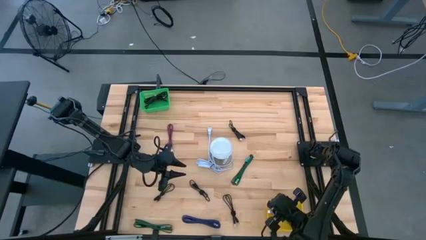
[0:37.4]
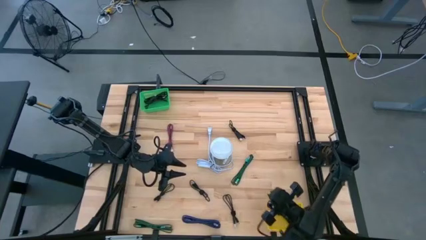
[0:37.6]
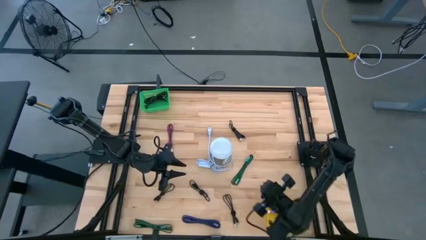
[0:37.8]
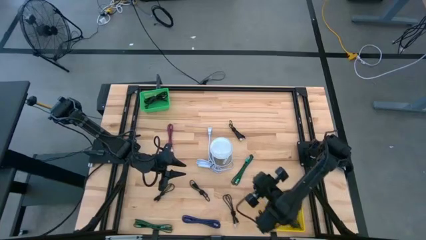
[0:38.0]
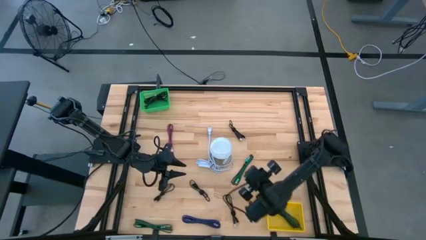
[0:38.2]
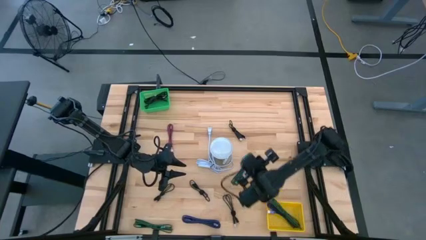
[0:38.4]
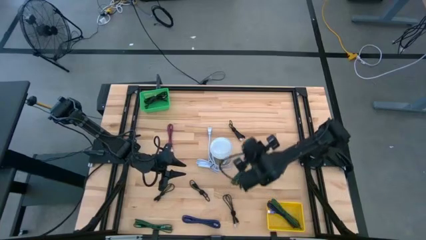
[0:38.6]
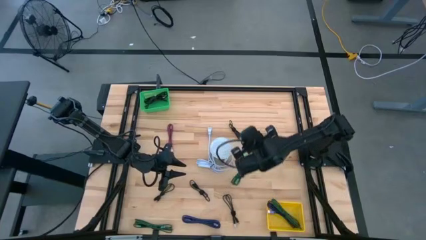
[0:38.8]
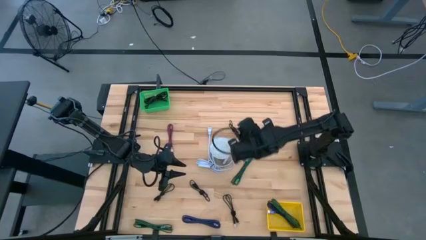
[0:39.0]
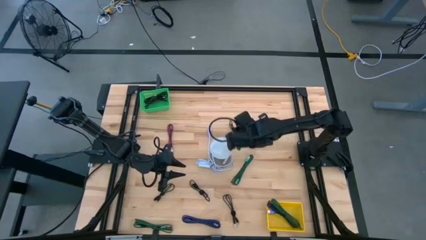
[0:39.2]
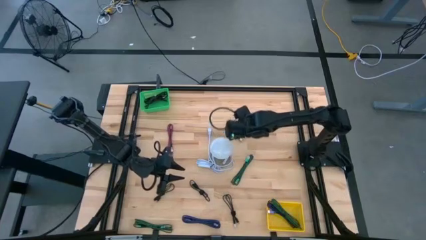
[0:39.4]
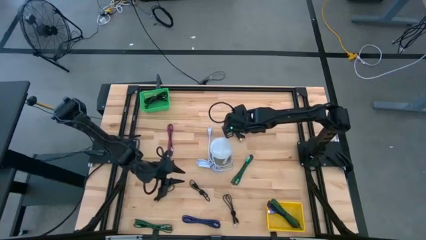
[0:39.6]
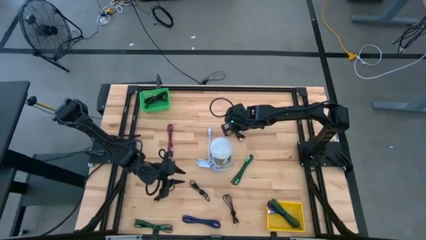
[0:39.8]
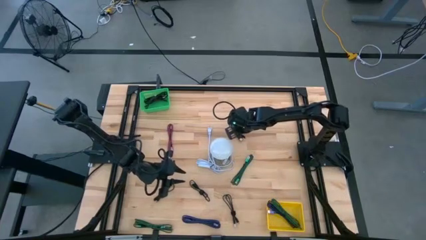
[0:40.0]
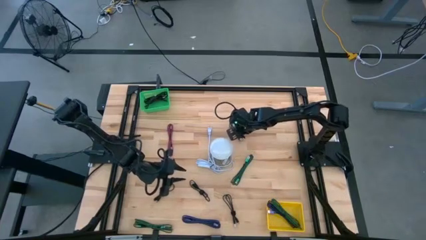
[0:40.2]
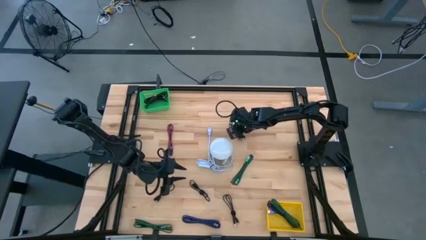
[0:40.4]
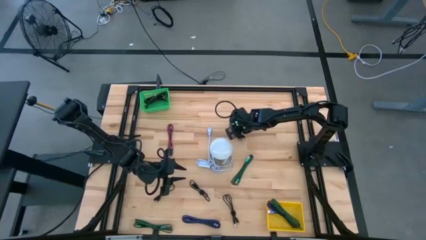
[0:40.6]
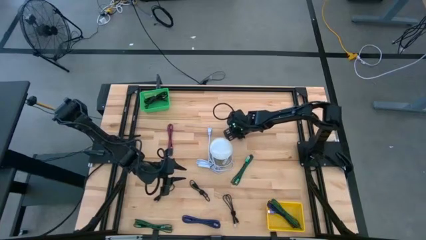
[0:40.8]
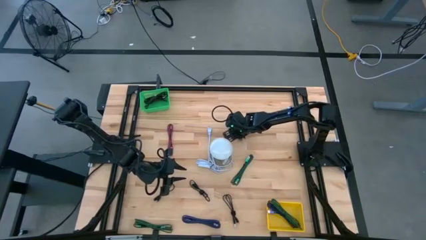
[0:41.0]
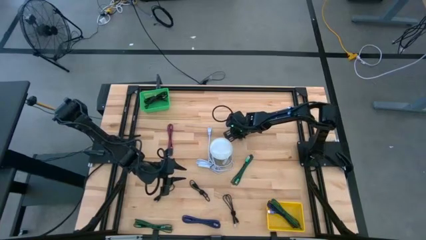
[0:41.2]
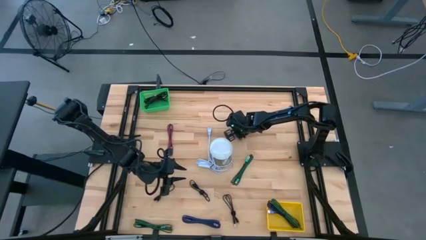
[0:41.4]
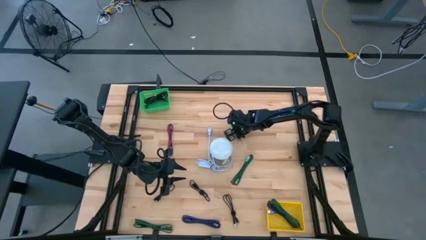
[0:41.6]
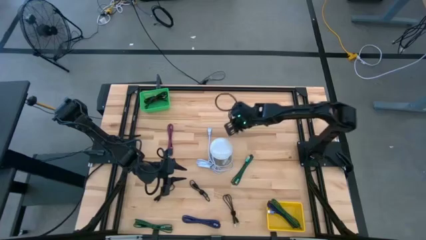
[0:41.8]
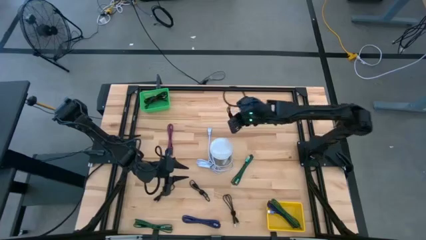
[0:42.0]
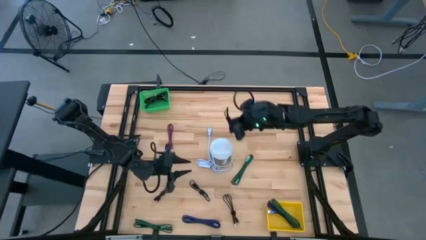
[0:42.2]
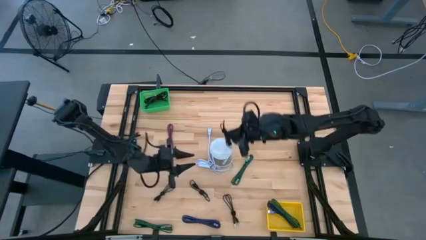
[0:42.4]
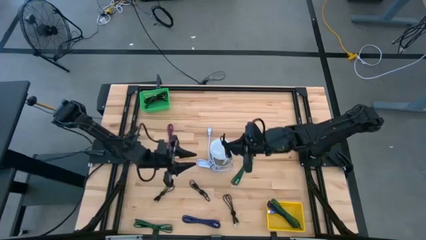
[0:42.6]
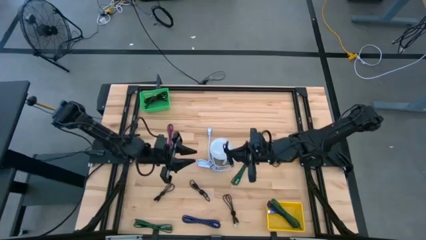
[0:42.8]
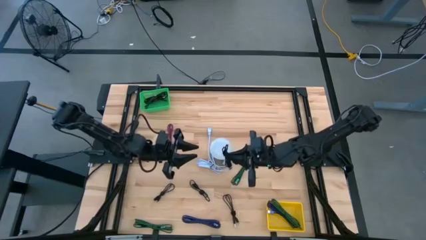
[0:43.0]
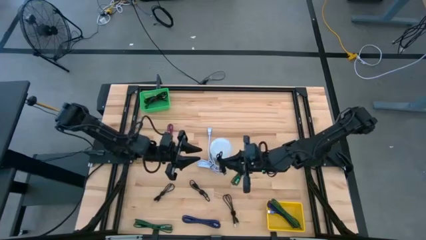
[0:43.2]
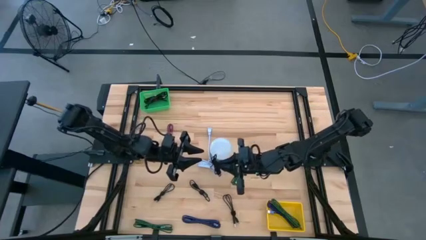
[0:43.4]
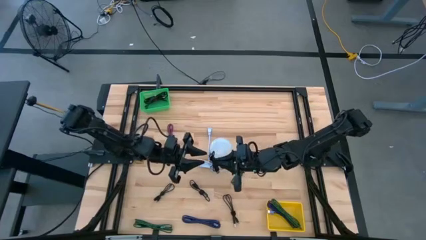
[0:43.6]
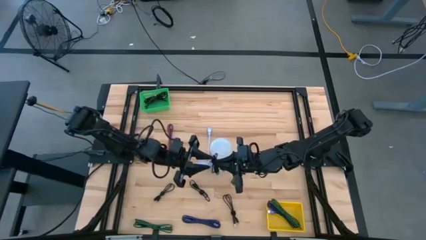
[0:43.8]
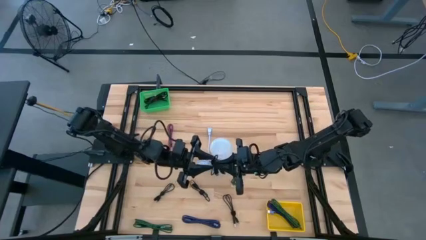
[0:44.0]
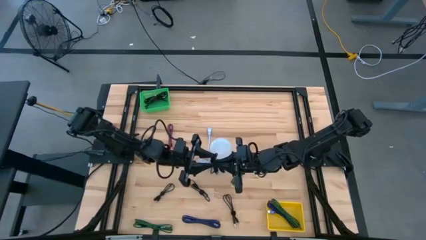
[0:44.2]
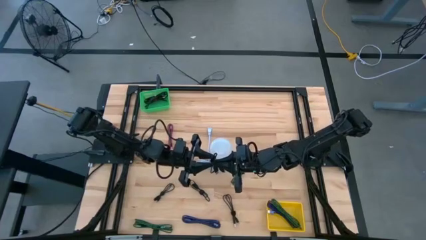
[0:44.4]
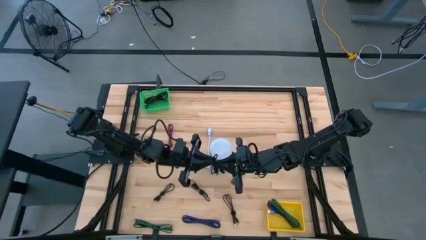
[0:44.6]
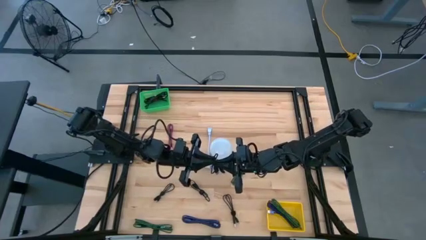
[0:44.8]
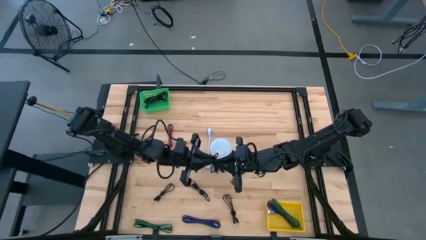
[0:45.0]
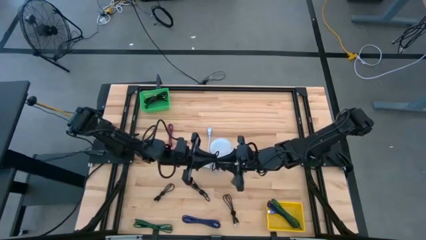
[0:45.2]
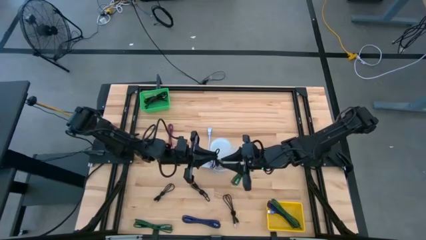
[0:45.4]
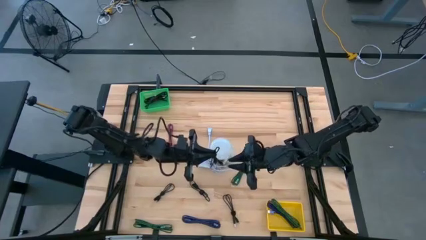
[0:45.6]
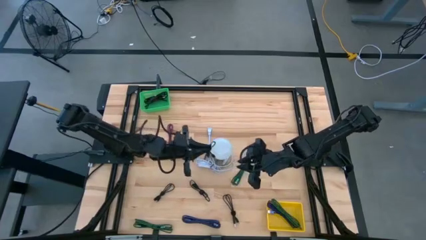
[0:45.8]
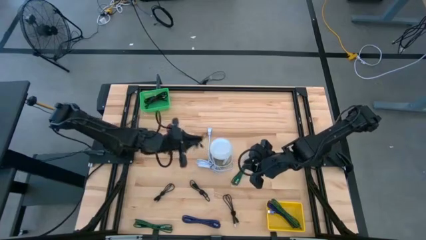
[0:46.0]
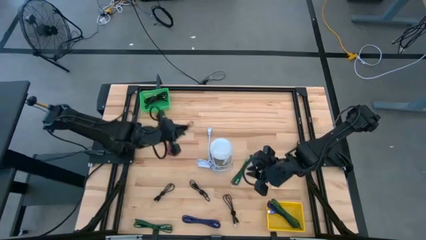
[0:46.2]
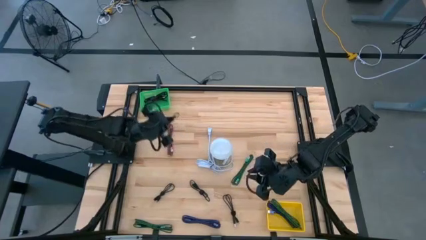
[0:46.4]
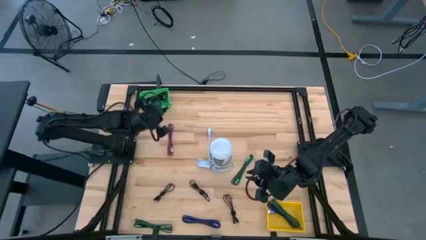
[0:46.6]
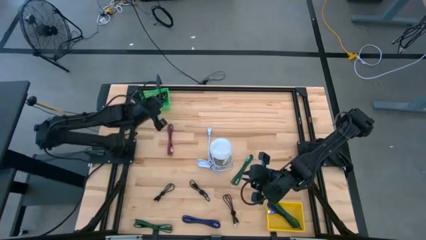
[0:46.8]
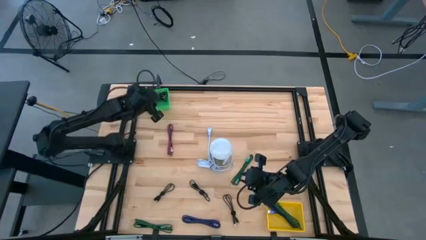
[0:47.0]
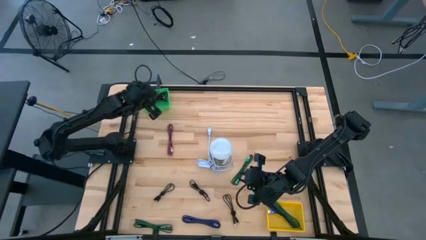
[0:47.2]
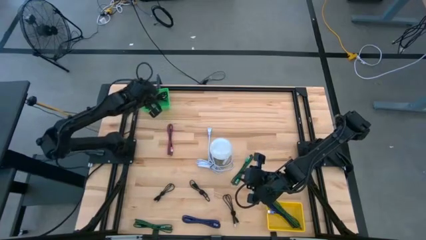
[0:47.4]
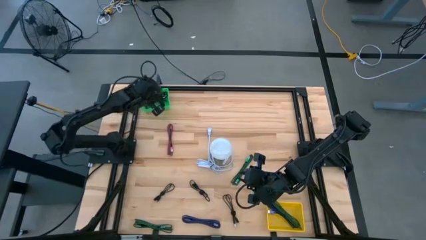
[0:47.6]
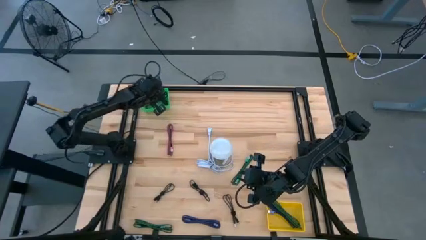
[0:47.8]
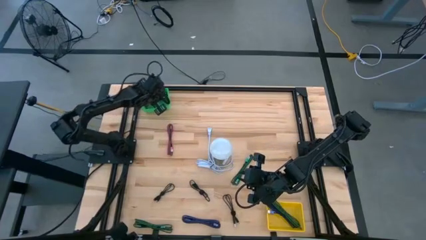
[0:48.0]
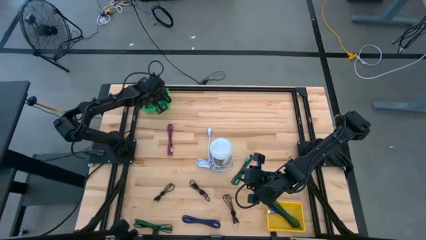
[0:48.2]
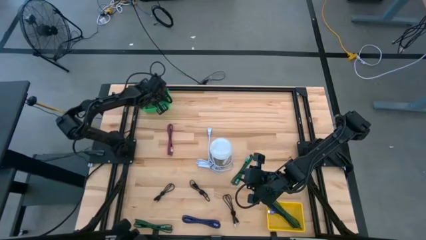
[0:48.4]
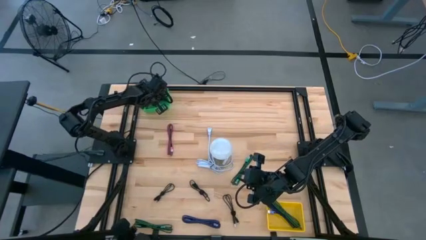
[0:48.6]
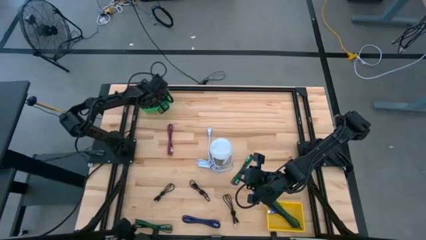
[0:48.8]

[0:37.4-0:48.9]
Task: Pick & Place USB Port
Put the plain black charger cable into the green basket

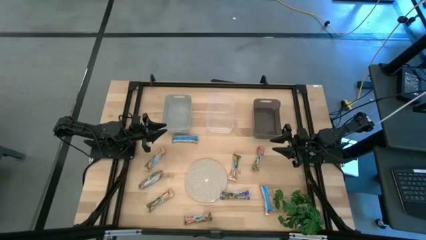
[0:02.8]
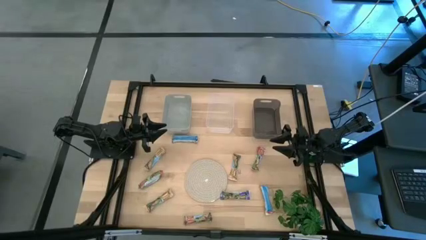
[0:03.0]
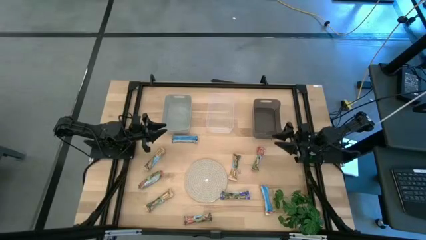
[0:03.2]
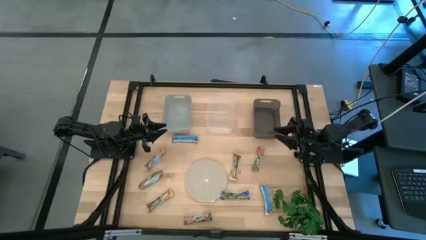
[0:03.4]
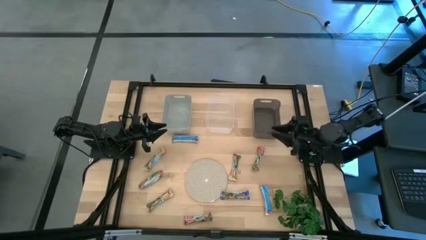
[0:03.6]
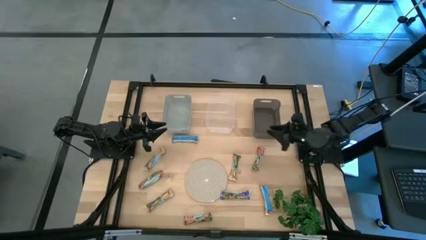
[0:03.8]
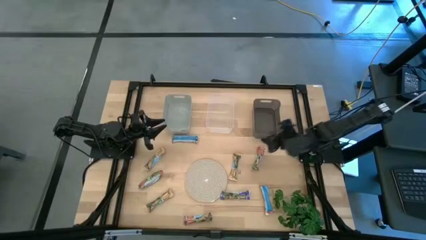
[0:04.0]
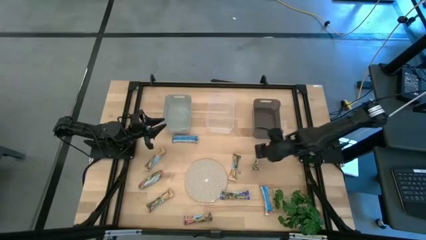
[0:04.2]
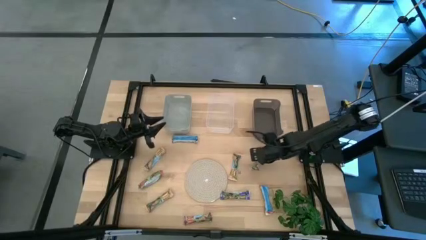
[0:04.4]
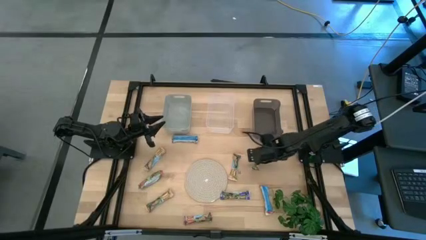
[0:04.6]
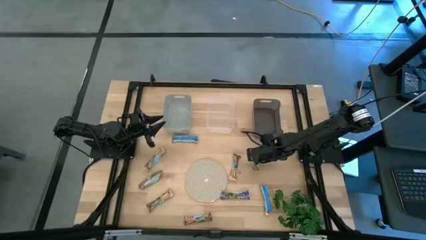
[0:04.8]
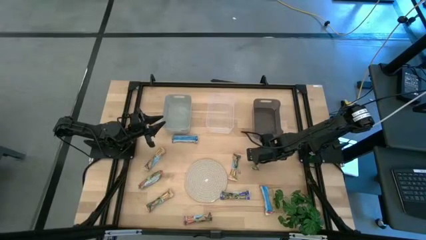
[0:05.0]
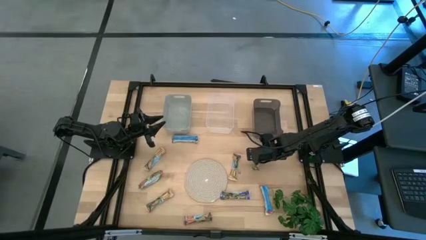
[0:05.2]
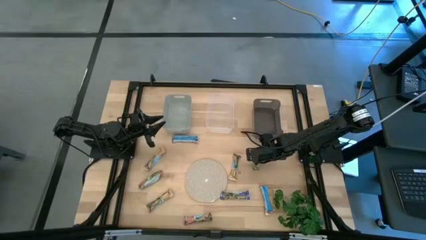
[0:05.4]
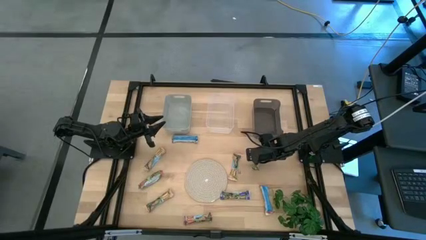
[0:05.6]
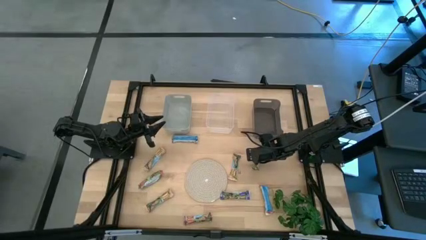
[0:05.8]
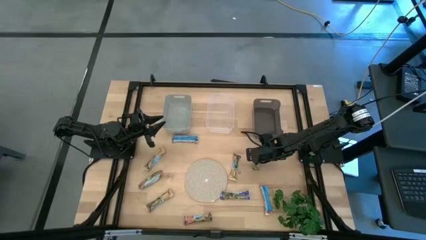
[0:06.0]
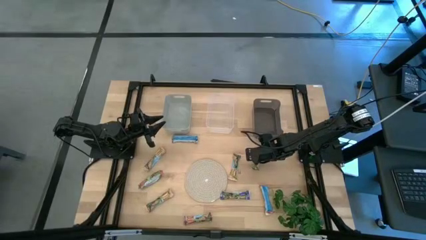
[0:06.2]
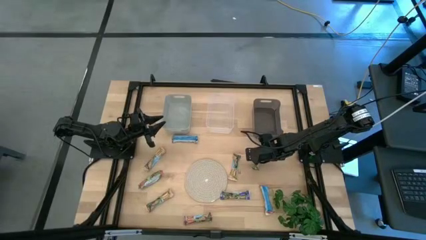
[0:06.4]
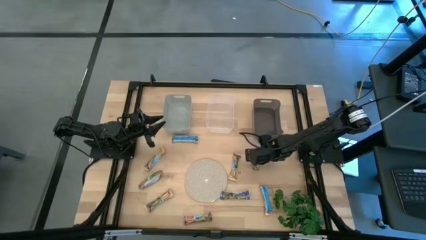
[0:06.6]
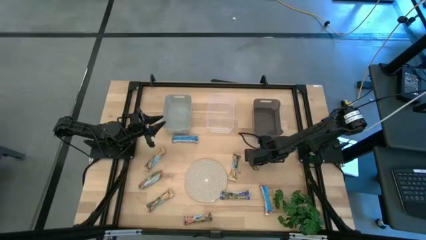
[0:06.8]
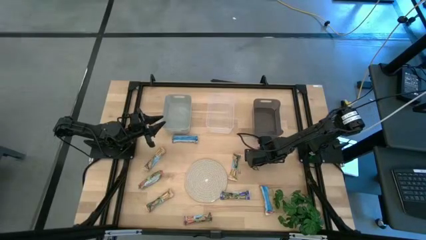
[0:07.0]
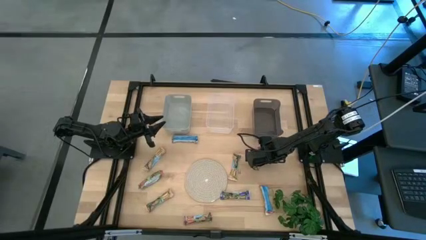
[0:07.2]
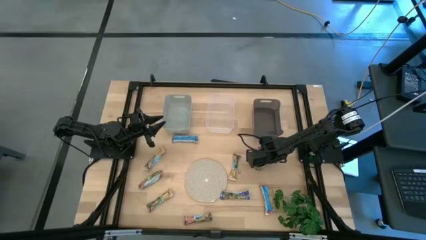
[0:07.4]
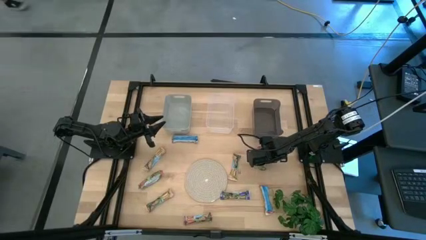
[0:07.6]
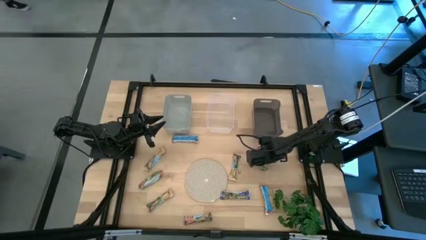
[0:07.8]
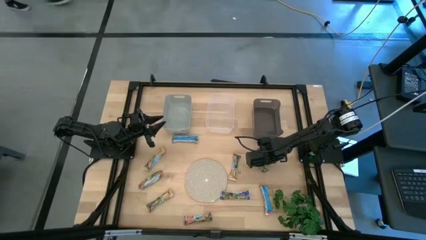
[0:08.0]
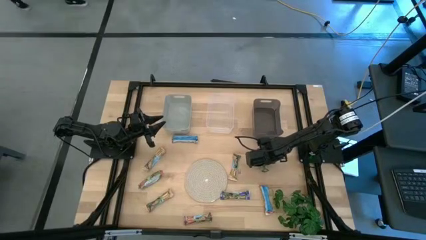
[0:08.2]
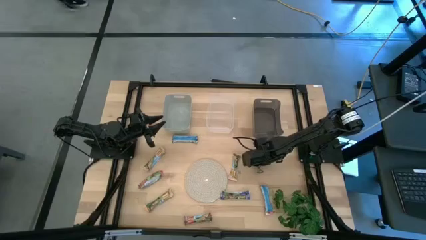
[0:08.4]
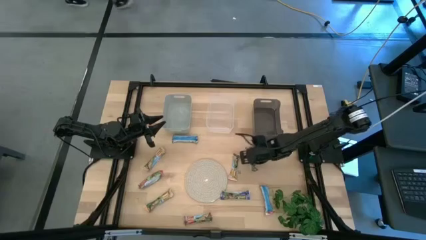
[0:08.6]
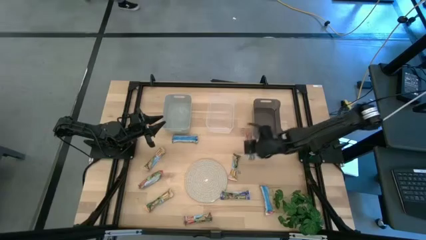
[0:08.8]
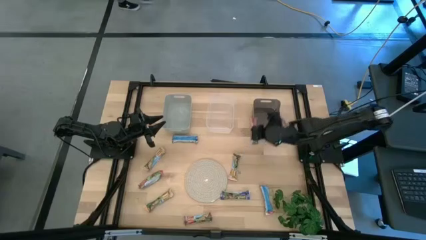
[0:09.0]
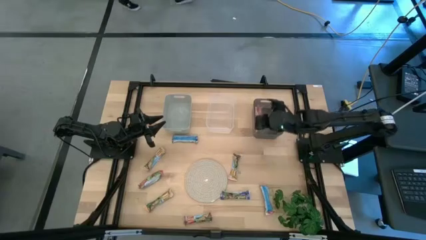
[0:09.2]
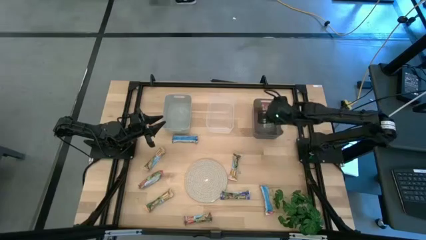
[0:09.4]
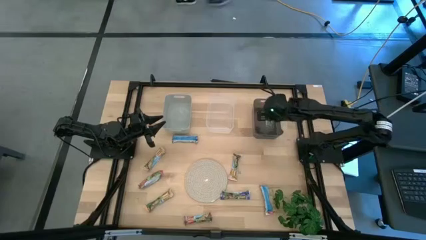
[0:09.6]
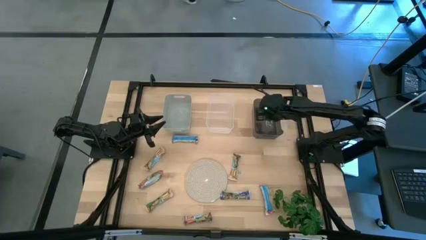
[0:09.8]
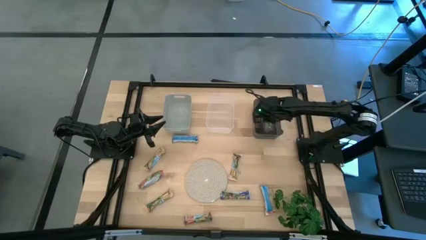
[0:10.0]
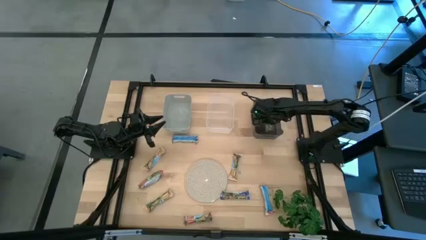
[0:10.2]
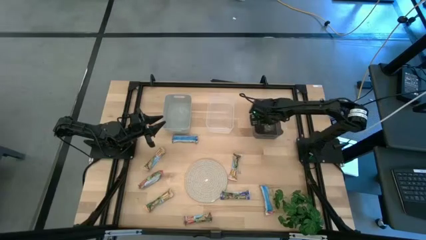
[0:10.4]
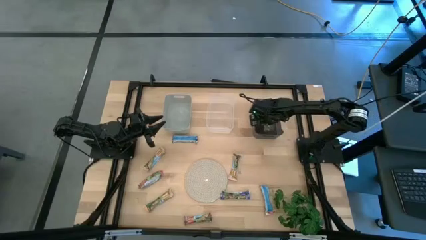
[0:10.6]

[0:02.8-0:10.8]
Task: Pick and place Granola Bars by type
Put the red granola bar into the black bin
